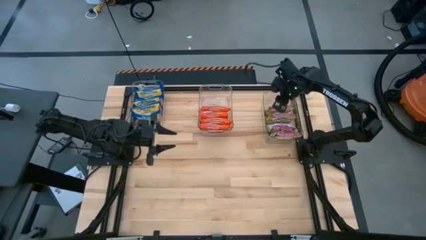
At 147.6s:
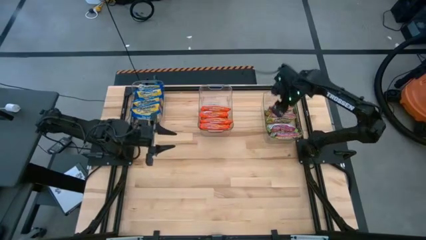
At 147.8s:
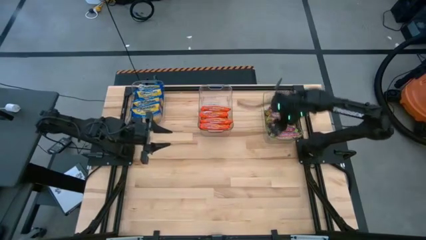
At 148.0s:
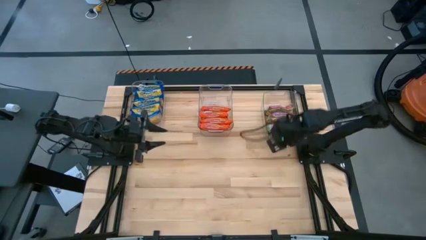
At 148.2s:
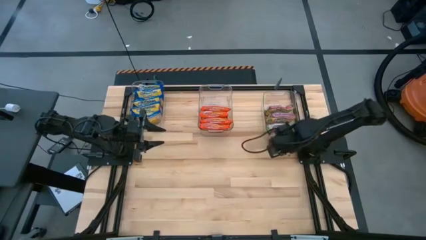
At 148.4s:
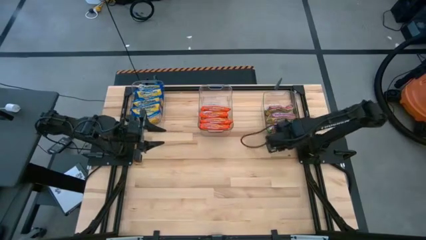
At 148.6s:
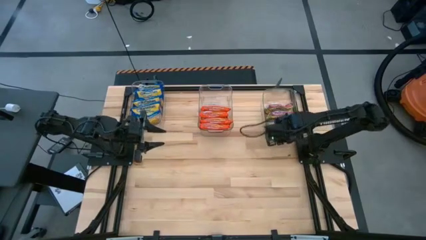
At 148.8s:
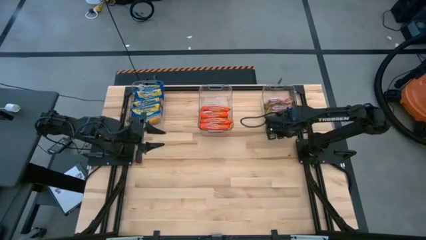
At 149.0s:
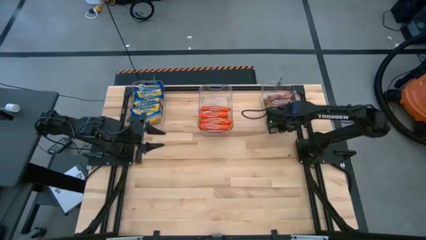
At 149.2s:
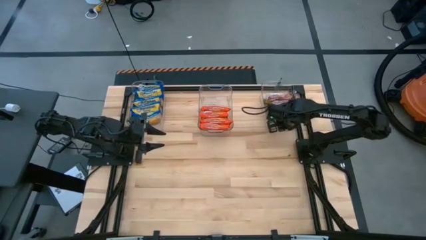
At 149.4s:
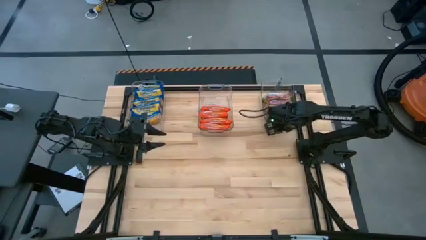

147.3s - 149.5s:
Task: Sort Maruchan noodles
Adjust the right transparent bin

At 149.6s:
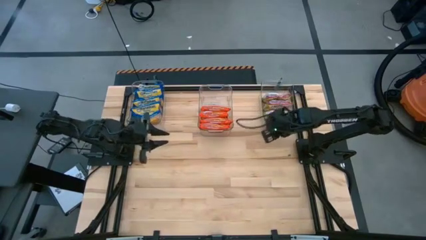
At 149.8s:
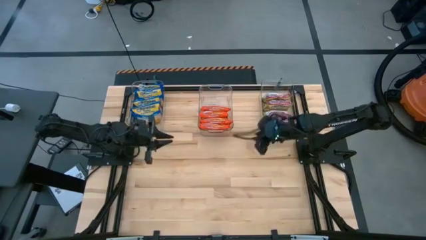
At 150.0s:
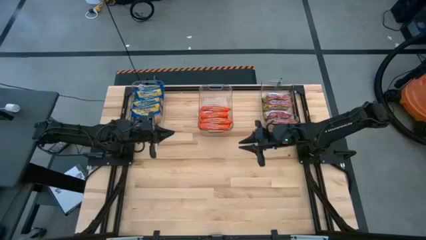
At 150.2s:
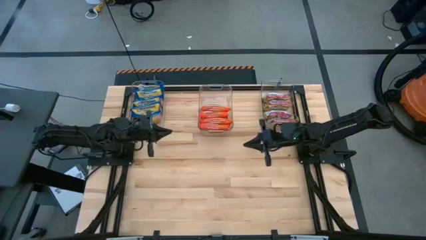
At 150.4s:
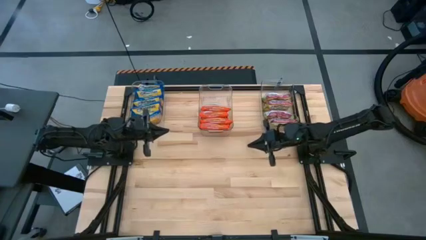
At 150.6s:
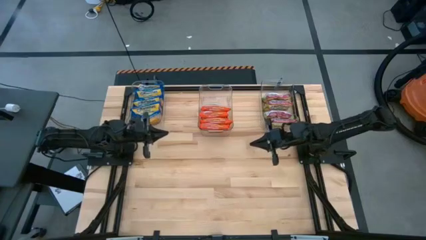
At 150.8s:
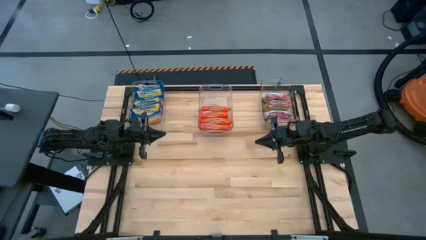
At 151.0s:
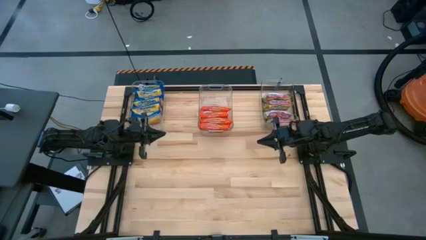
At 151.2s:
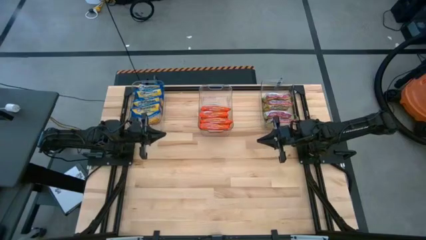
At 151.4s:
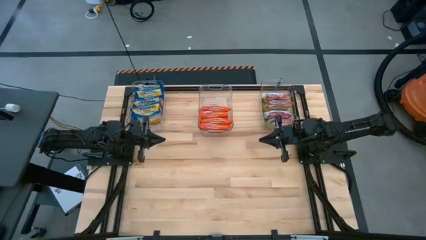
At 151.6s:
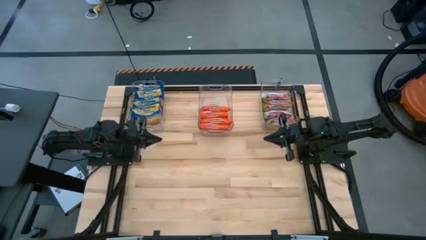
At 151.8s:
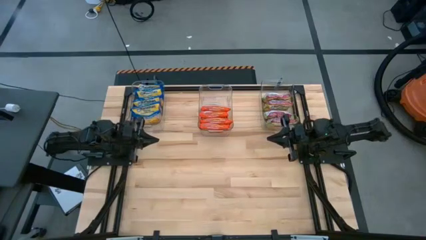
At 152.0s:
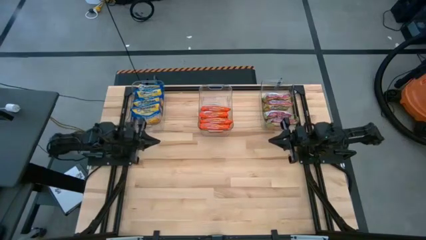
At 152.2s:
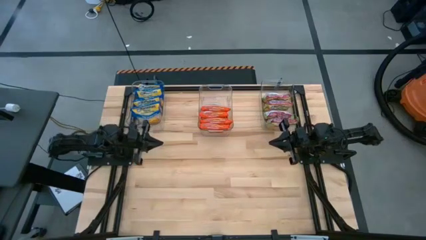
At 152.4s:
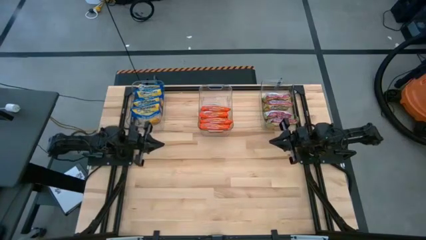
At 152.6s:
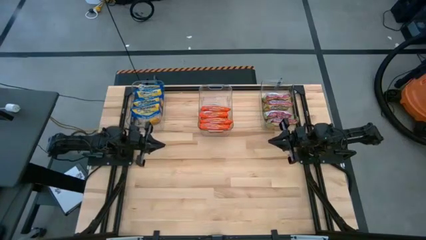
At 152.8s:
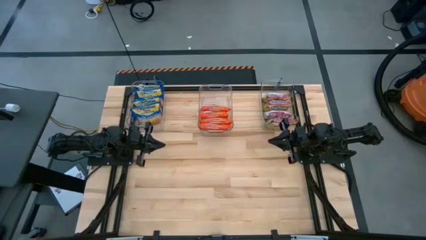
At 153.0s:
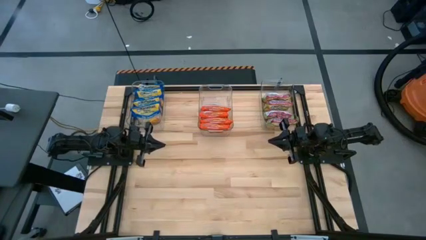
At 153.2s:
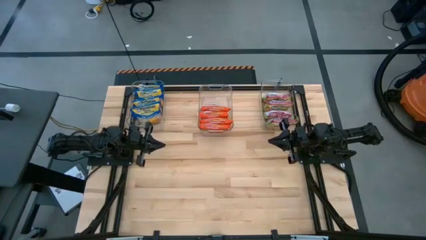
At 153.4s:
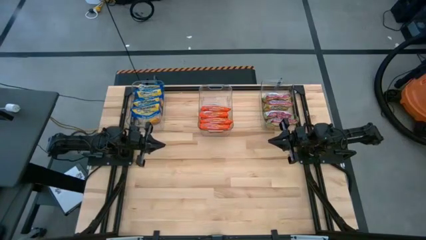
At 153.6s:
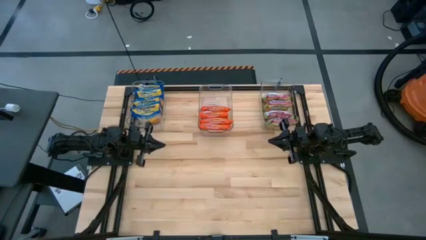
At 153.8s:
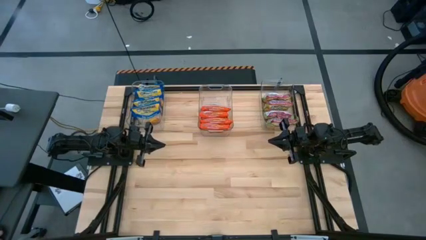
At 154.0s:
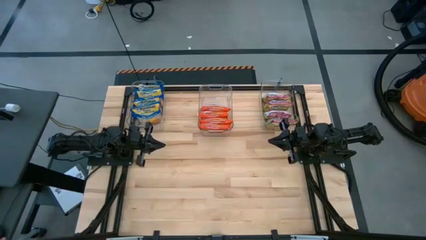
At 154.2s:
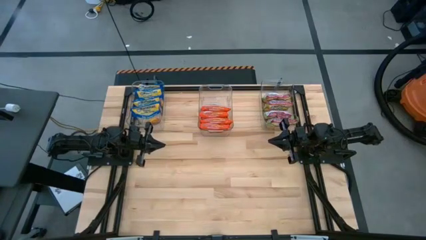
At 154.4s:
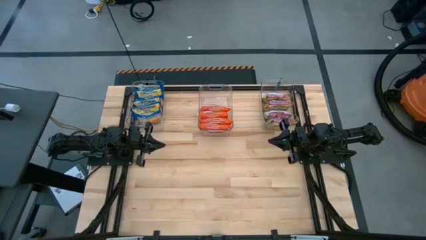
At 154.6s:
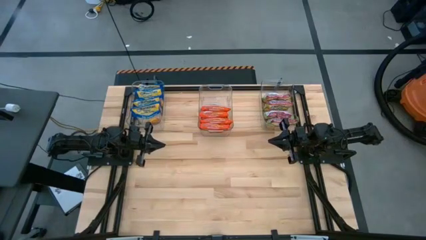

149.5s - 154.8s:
Return to Home Position

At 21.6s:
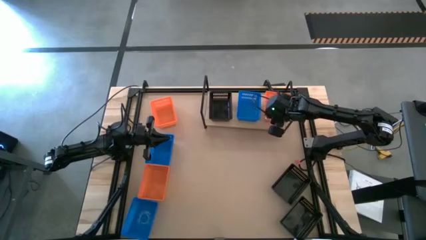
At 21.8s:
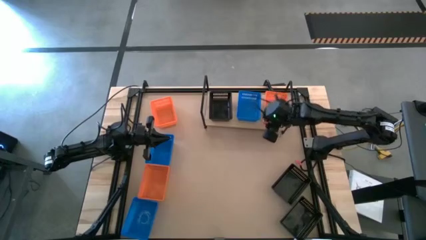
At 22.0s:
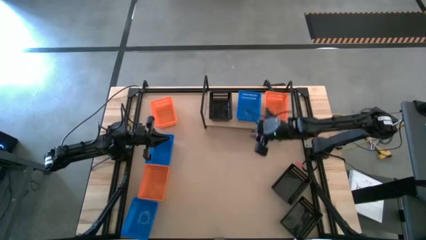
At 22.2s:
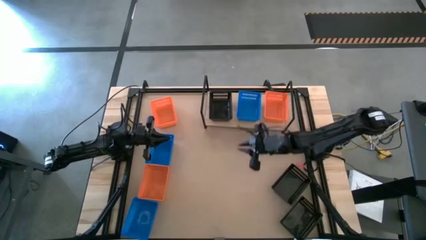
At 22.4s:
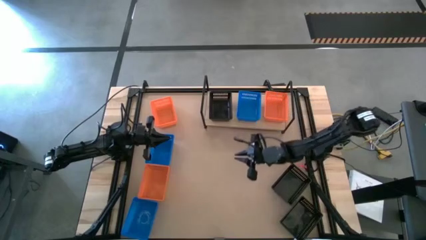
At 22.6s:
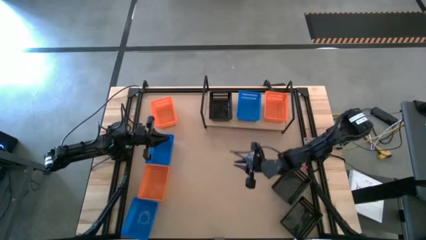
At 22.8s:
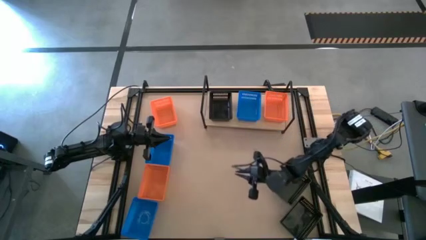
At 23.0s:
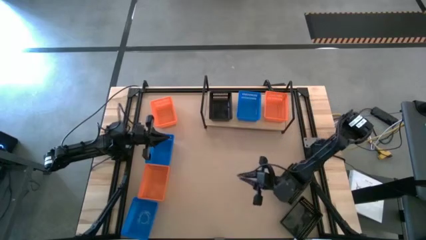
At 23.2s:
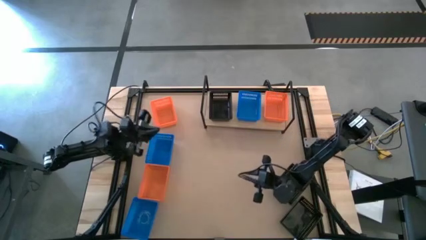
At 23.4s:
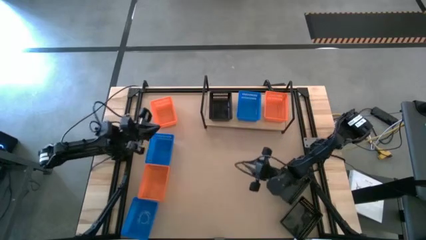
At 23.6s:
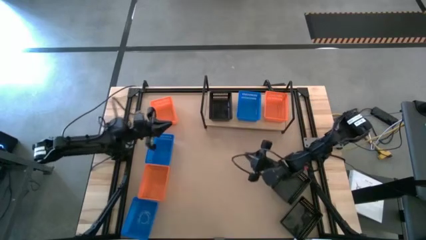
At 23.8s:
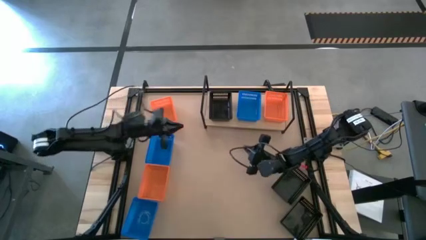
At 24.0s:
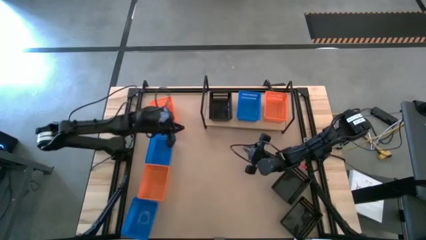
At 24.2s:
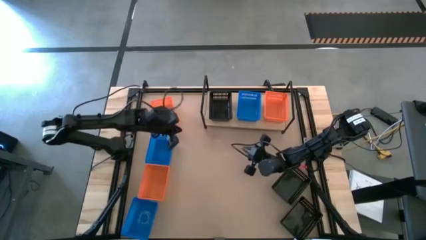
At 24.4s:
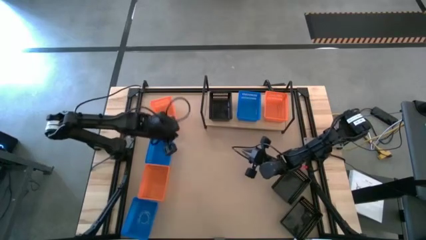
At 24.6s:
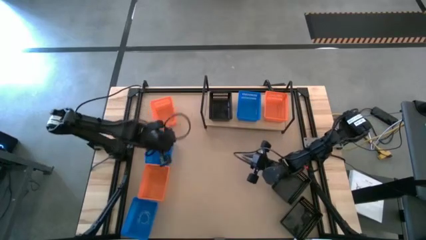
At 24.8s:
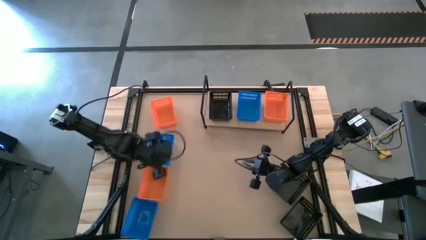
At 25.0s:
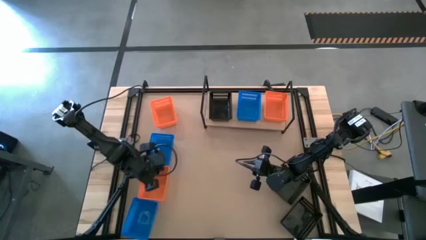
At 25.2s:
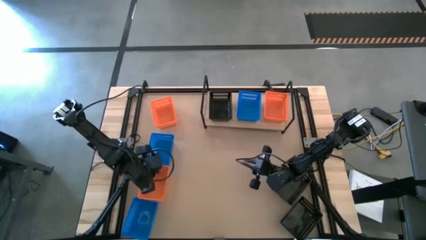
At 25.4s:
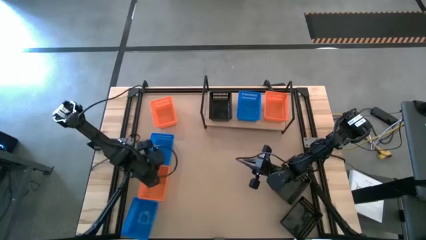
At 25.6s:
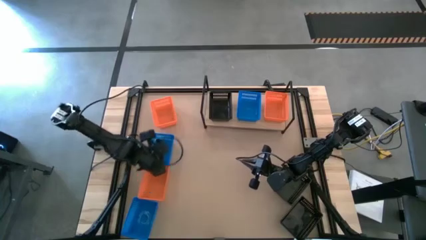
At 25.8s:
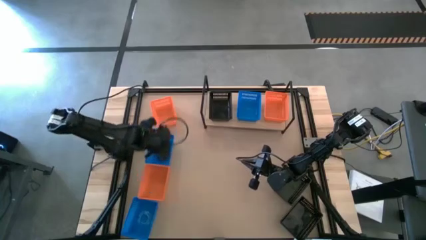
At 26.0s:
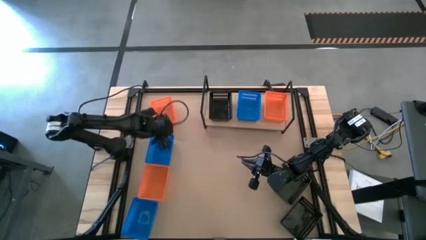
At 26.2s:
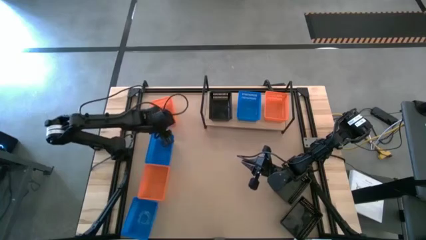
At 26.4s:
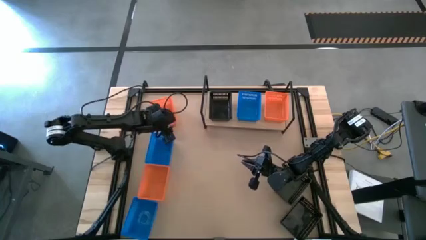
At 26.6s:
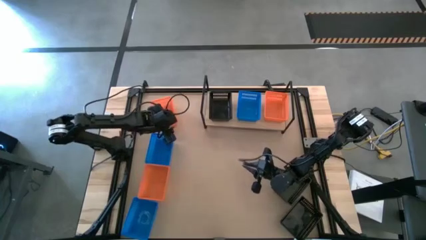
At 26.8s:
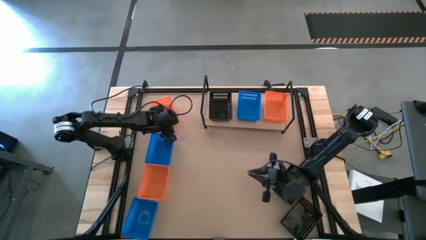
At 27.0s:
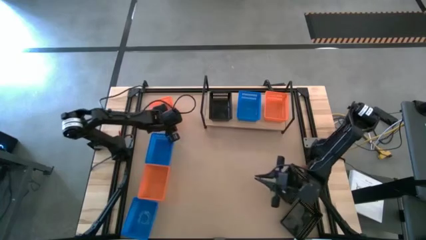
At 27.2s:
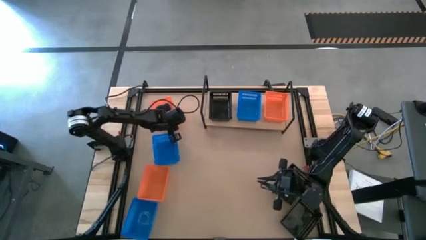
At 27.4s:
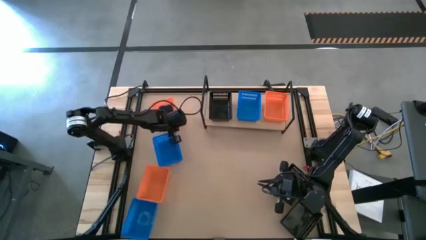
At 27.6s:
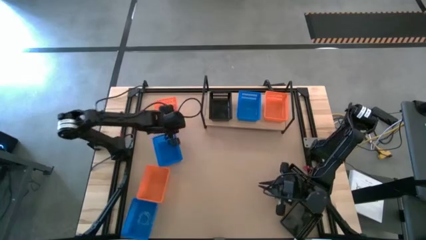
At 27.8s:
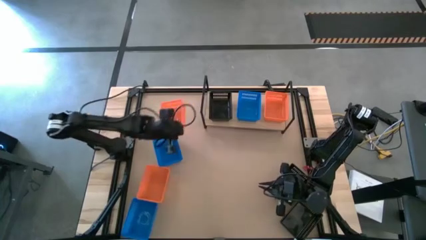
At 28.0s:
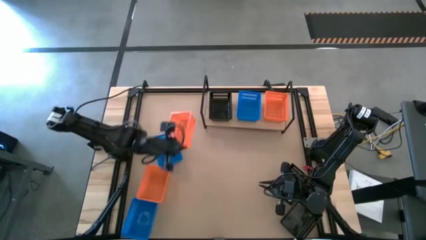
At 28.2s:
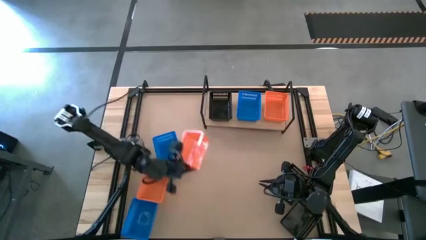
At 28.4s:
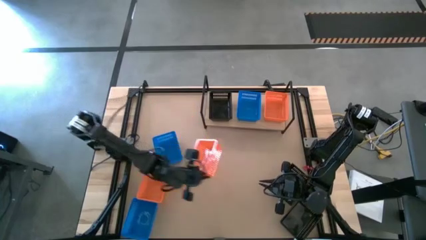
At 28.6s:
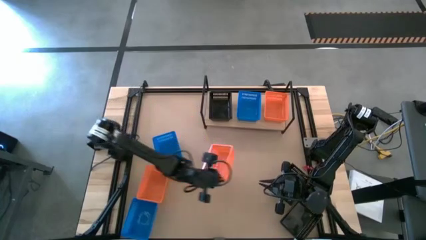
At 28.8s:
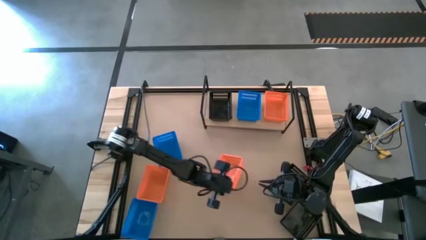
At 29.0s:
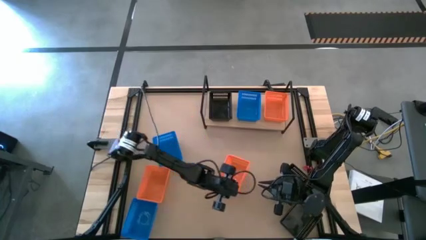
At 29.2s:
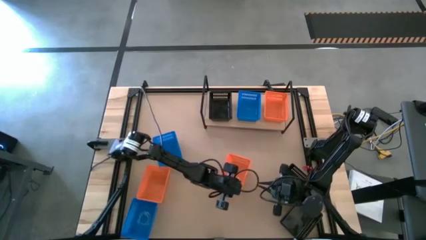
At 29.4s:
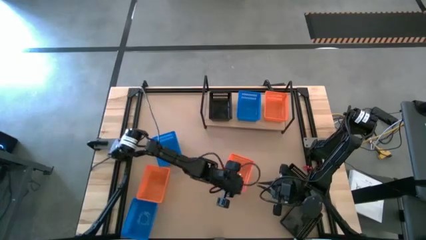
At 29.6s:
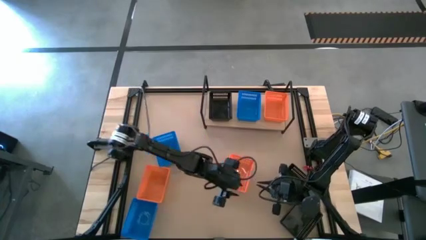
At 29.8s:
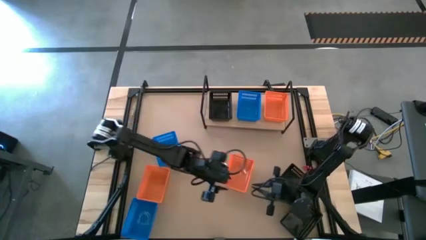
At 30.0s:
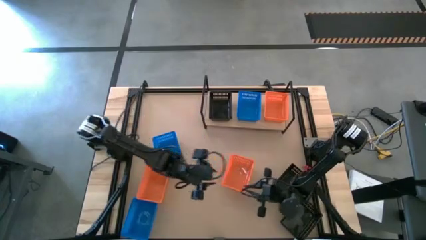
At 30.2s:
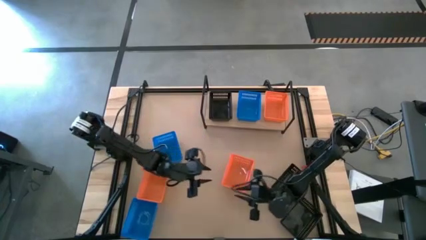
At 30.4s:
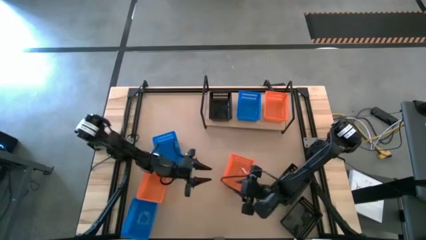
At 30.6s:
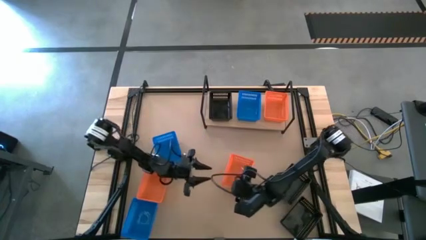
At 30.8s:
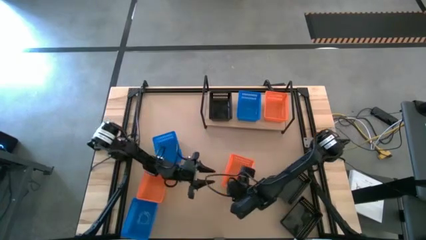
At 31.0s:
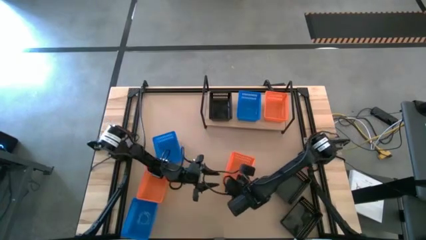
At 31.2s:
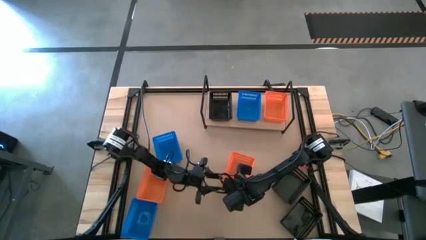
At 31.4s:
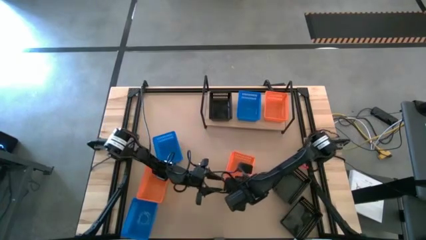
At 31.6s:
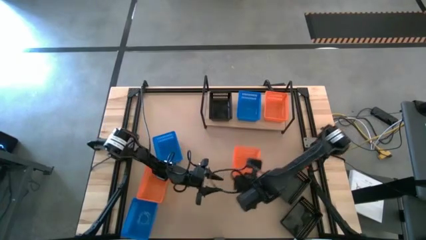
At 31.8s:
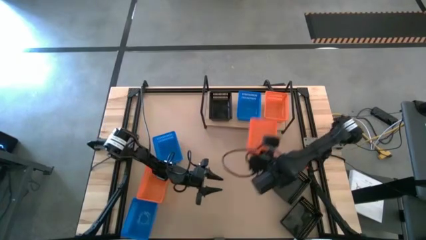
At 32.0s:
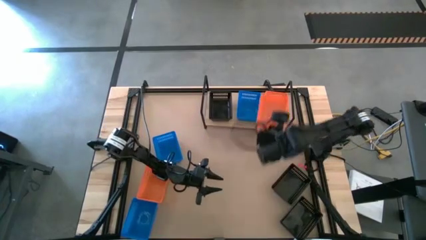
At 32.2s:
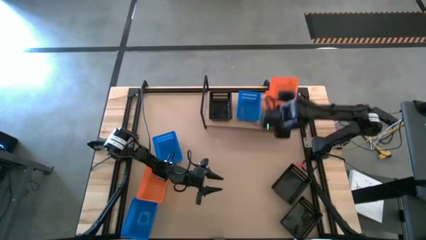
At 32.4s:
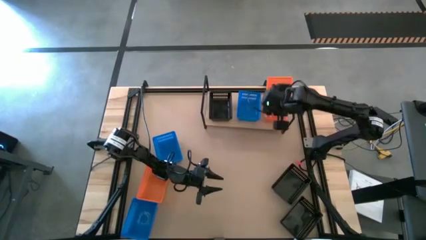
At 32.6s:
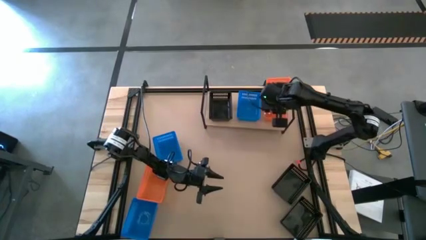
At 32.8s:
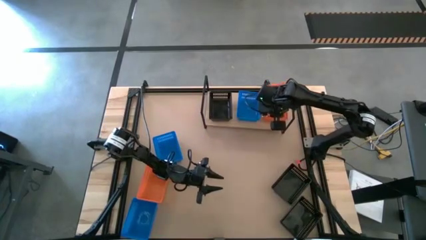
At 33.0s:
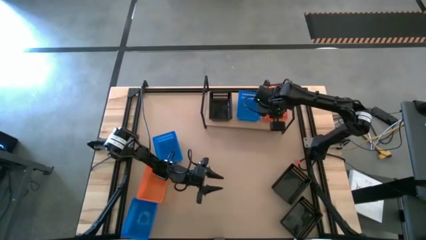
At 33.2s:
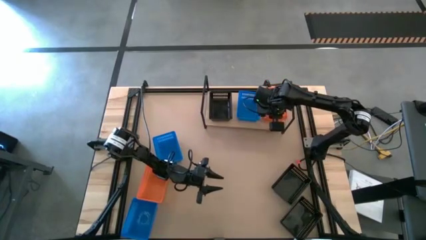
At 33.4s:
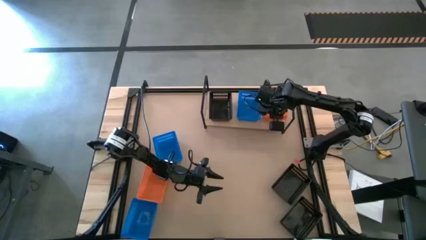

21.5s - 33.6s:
Task: Stack baskets on shelf by color
Stack the top orange basket on top of the orange basket on the shelf
